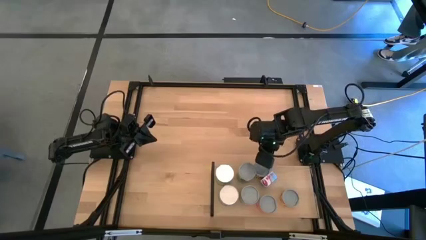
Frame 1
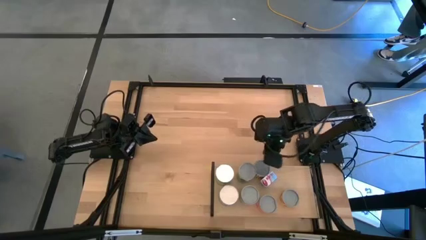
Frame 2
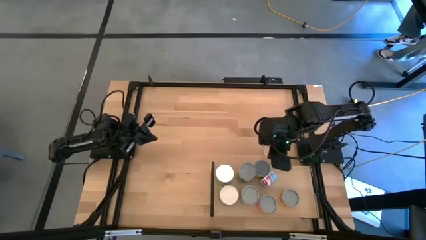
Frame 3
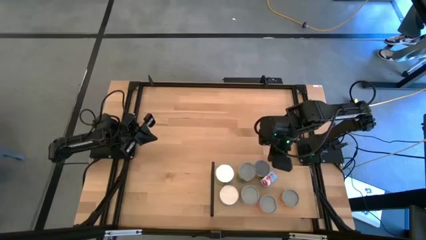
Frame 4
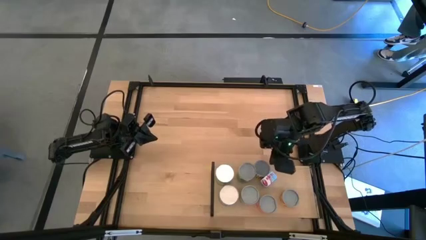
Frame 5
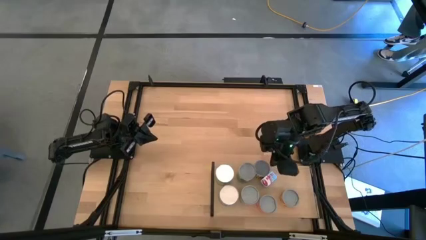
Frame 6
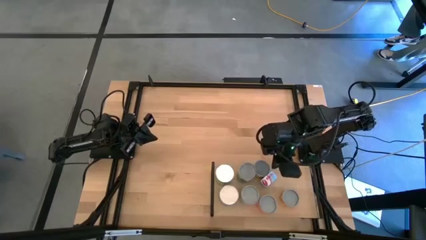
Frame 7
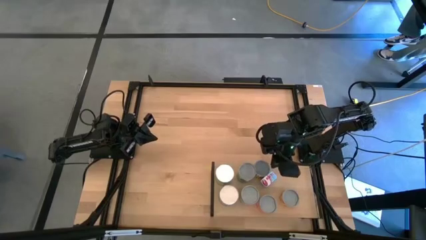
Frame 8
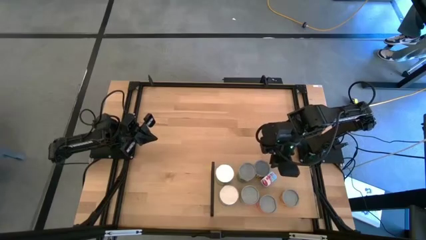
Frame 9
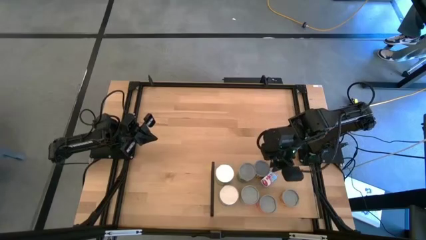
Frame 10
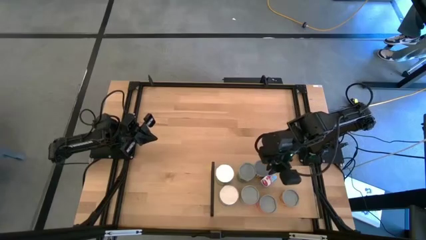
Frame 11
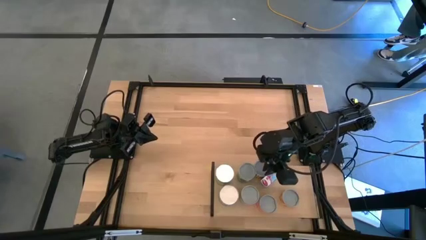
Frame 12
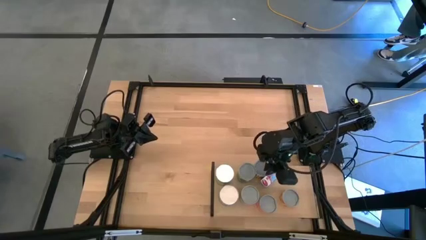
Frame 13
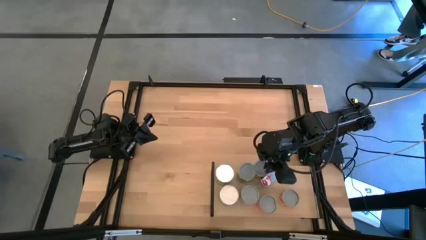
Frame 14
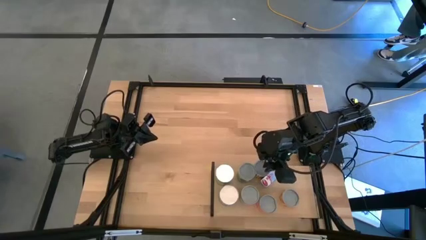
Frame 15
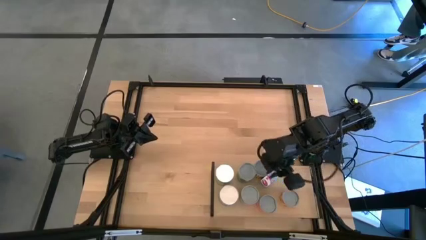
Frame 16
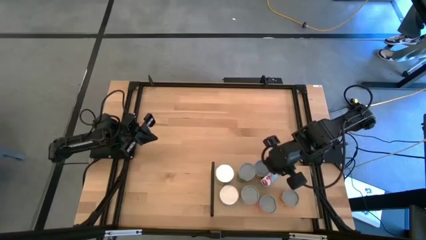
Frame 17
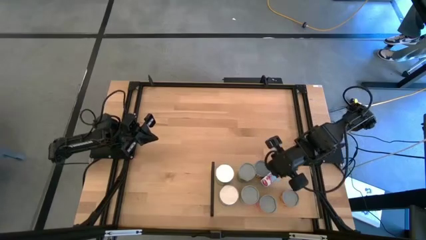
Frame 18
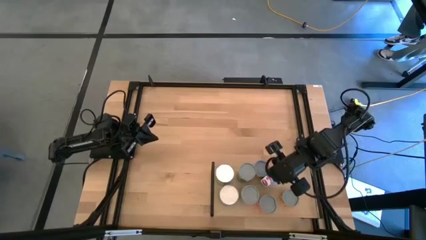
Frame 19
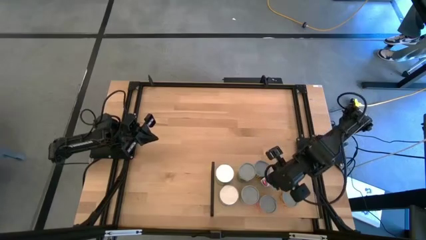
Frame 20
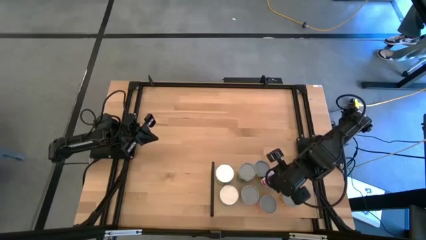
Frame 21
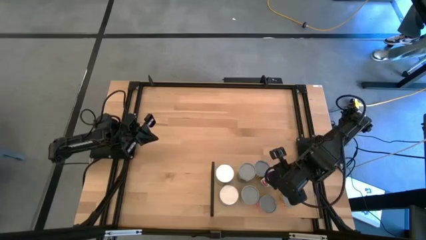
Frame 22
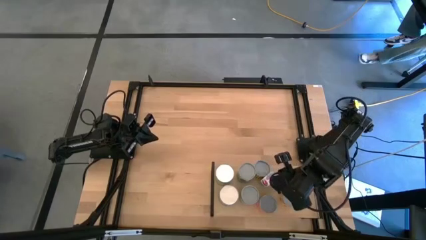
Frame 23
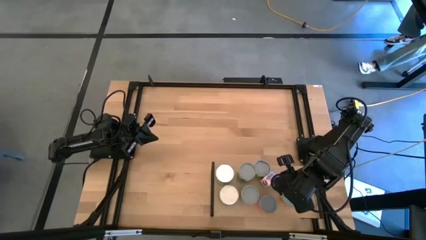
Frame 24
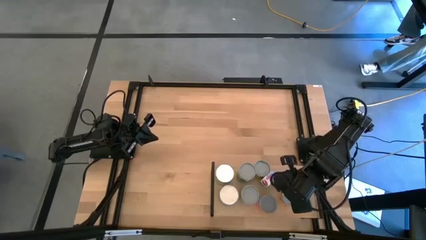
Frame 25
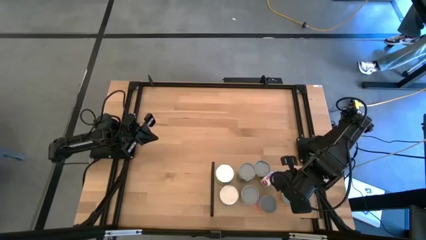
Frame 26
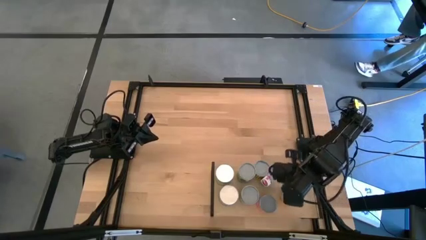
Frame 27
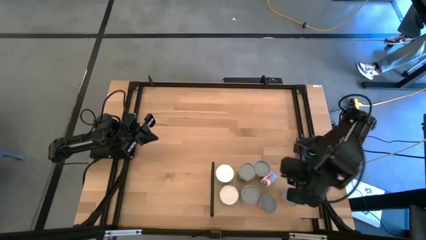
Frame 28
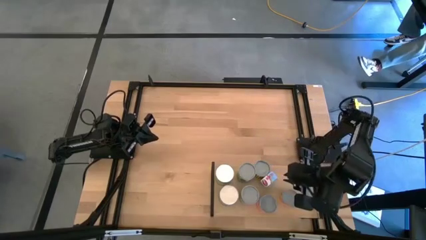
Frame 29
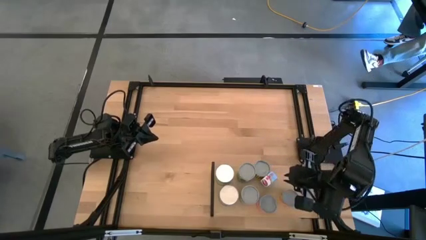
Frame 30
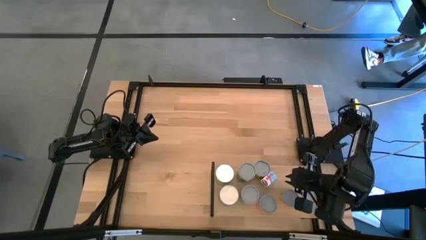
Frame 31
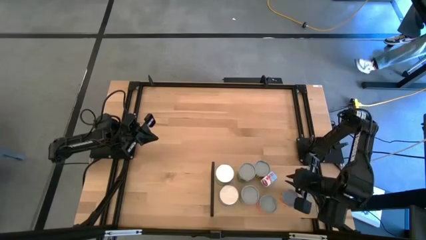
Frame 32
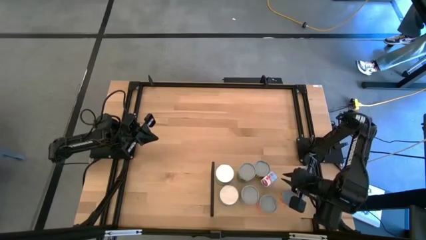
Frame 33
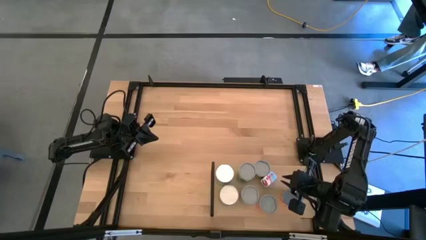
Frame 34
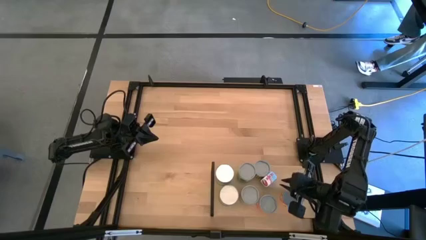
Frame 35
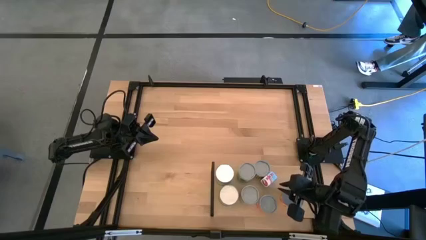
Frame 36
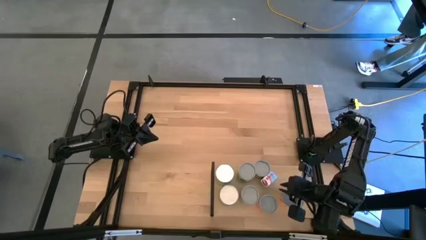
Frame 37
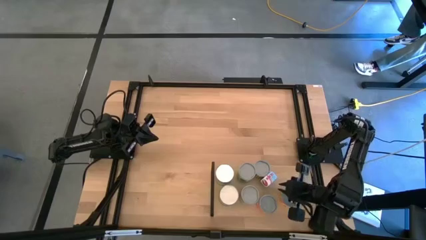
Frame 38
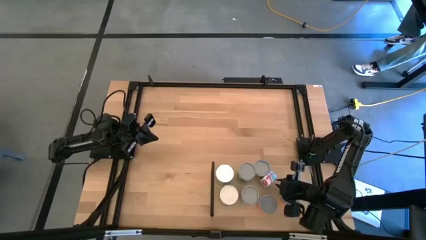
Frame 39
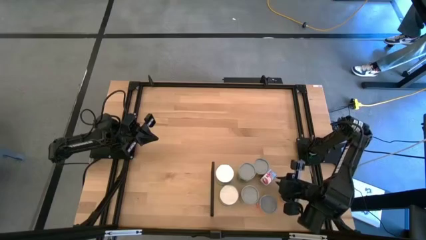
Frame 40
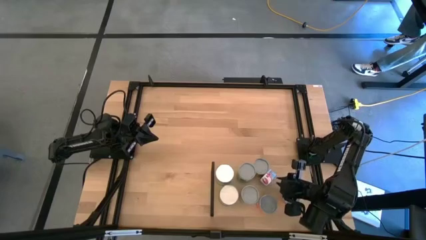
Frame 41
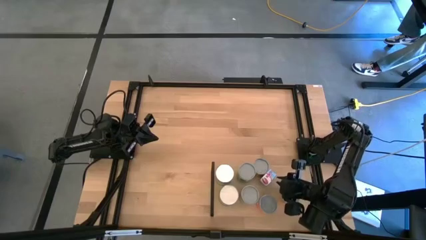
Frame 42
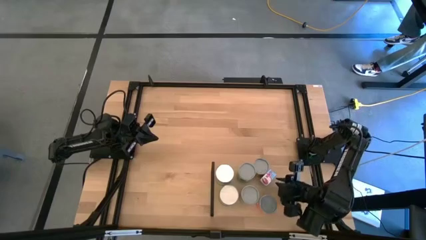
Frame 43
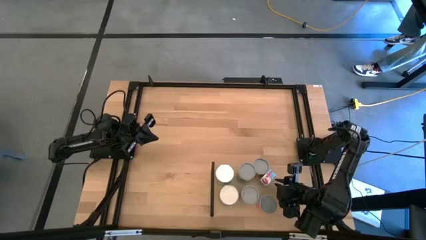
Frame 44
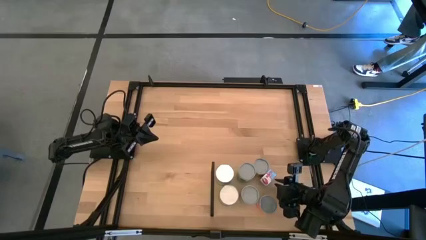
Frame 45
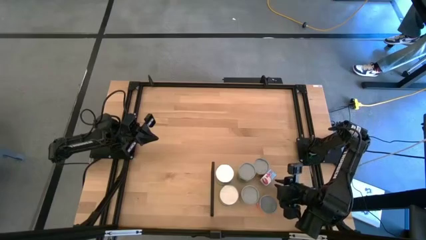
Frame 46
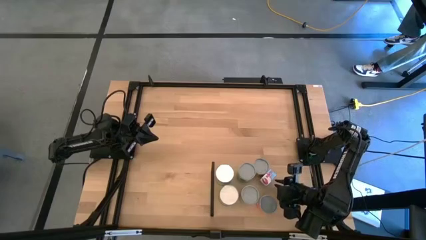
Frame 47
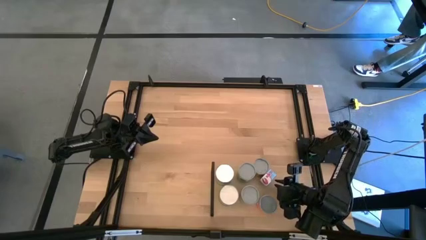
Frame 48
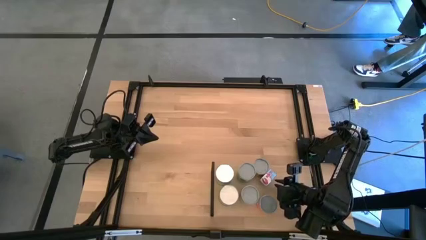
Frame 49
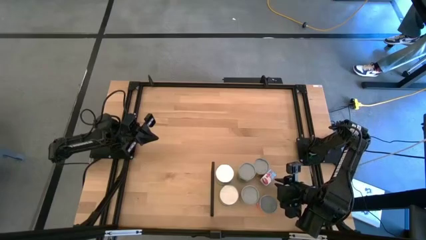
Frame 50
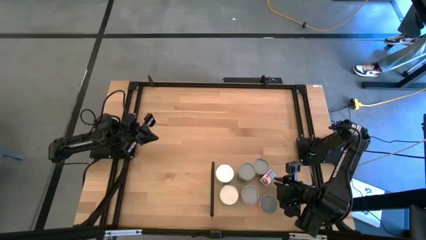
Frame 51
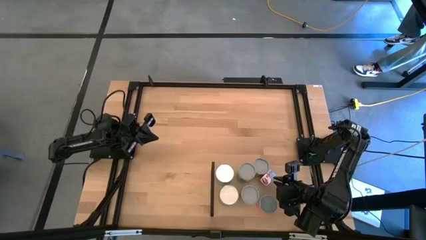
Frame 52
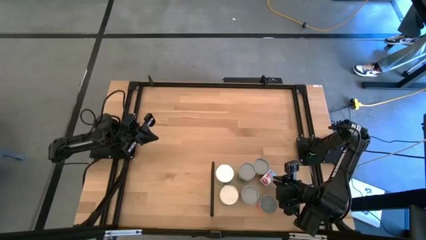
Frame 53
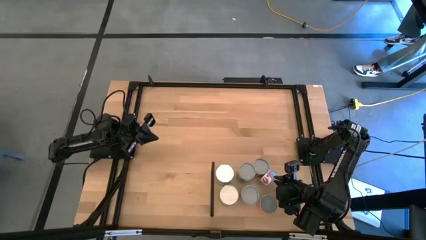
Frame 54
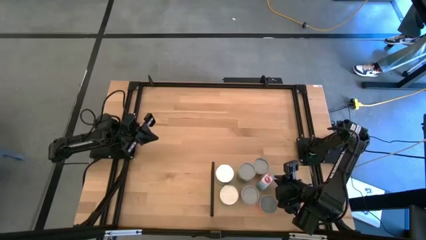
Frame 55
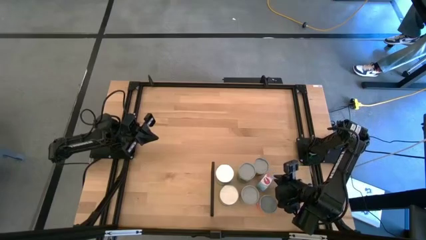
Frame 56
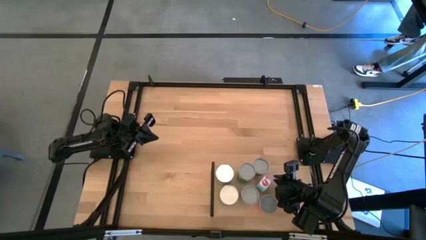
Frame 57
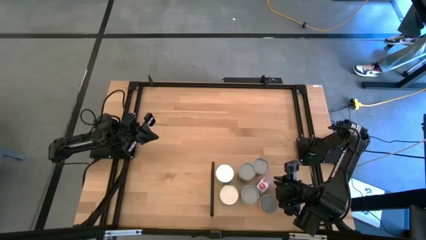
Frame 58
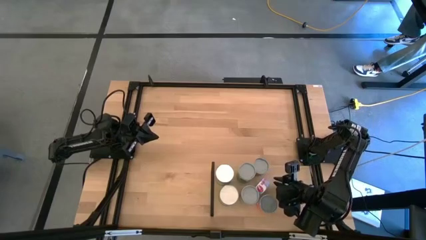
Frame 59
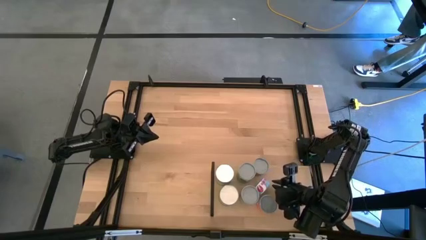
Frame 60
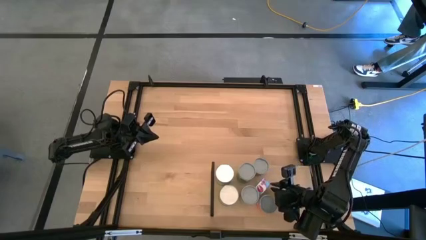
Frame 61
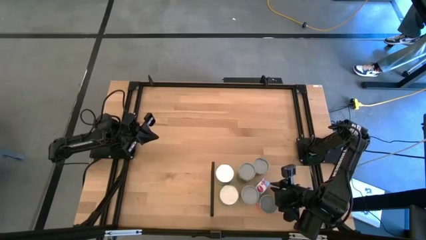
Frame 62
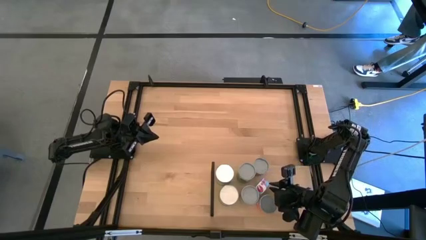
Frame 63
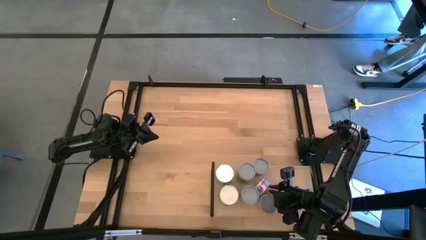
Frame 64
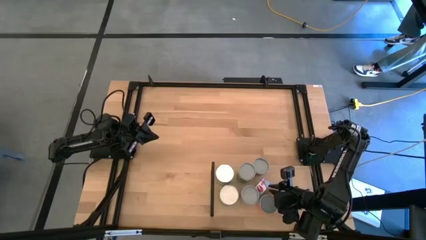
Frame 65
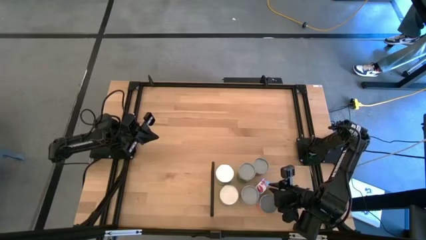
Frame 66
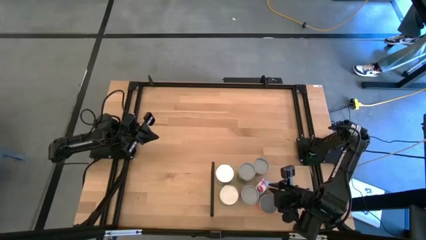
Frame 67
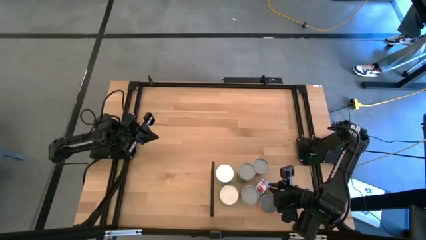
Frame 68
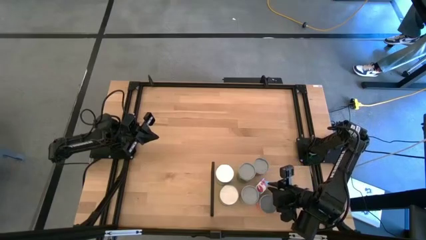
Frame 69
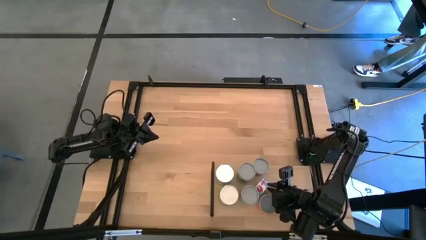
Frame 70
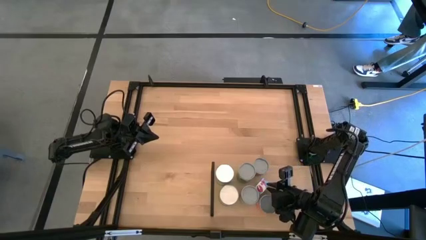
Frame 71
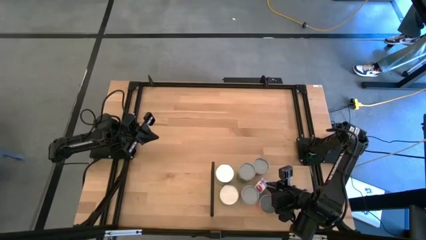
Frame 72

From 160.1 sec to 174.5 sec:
Task: Pick and place cans onto a shelf
Adjust the tuna can on the shelf

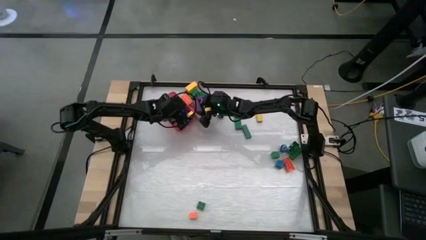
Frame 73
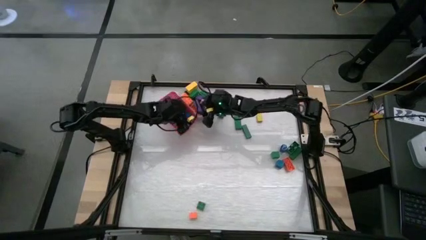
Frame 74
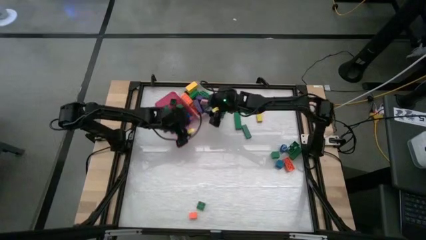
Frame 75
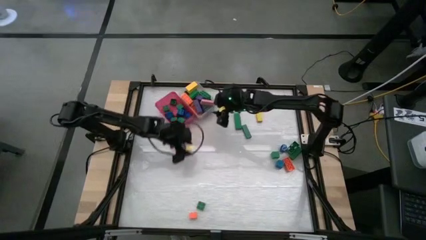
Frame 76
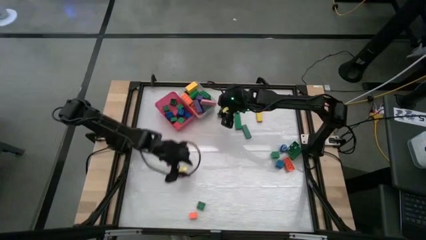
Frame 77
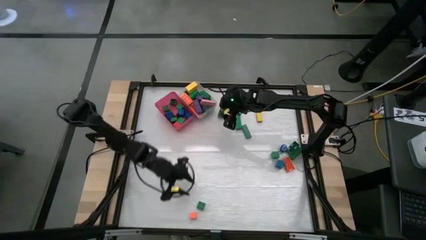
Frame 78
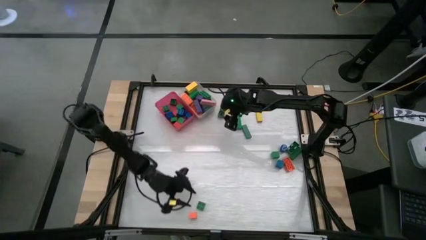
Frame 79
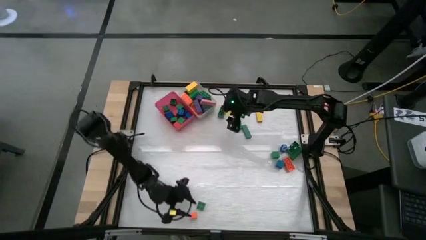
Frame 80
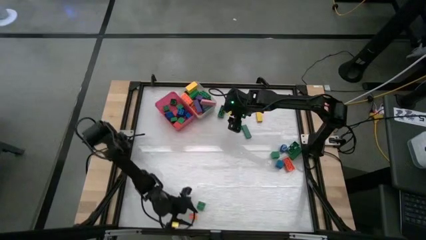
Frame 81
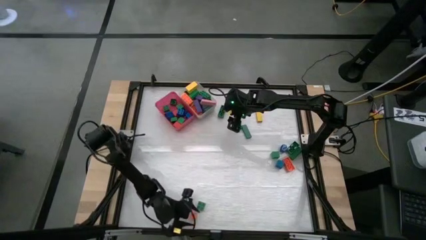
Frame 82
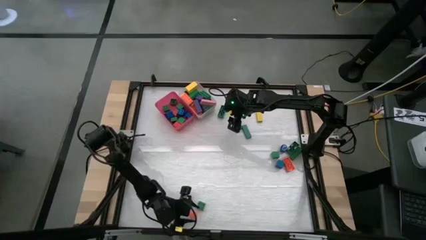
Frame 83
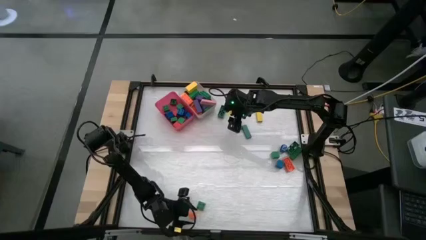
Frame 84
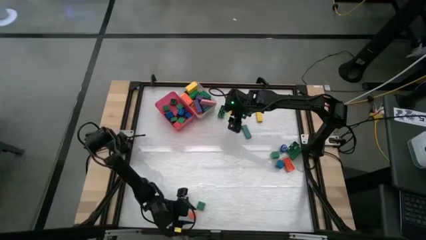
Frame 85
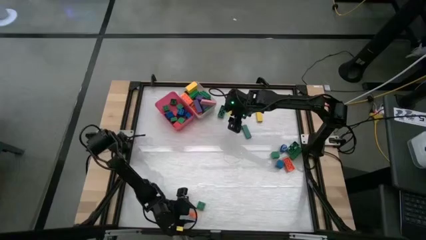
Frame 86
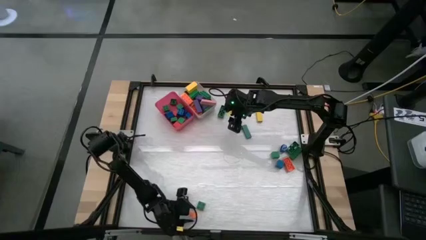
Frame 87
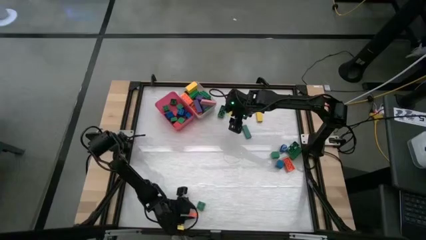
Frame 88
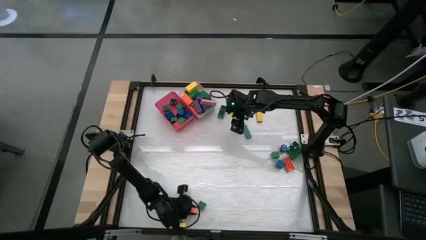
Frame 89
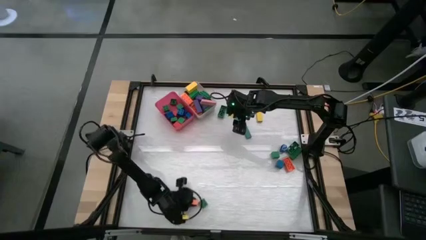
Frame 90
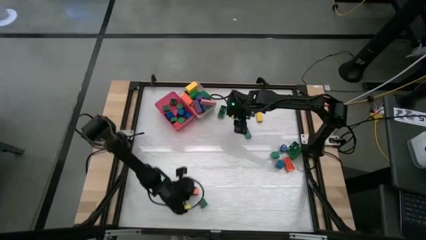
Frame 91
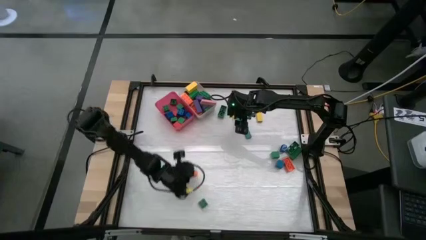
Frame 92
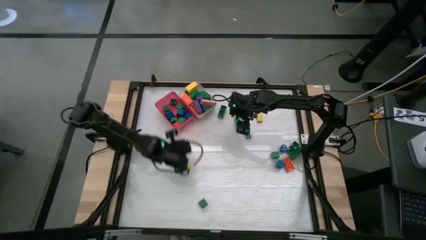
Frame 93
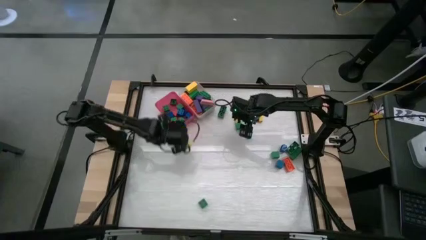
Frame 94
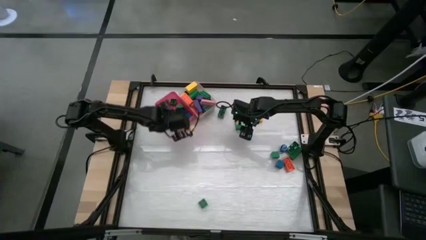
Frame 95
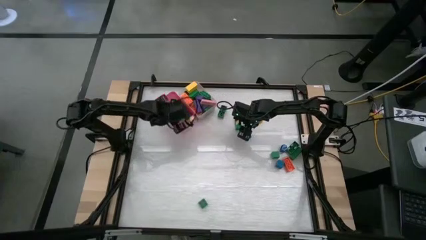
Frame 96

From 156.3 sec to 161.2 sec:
Task: Sort blocks by size
Put the small orange game piece into the pink bin
